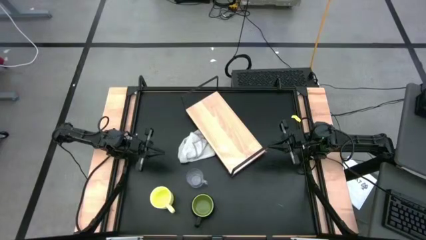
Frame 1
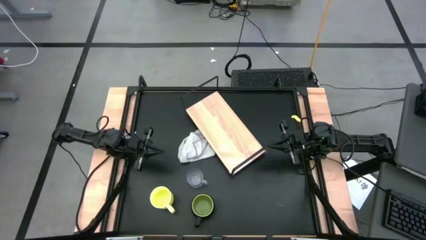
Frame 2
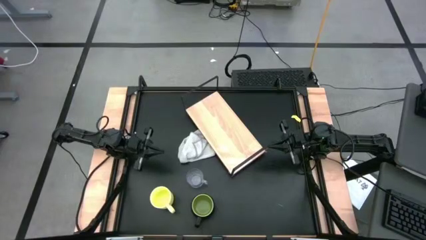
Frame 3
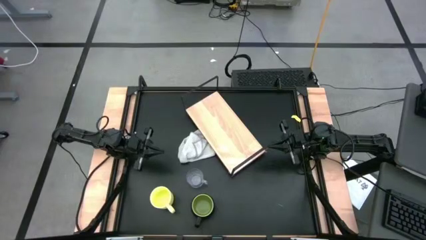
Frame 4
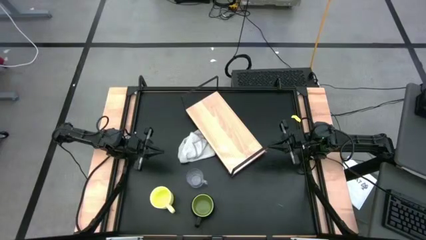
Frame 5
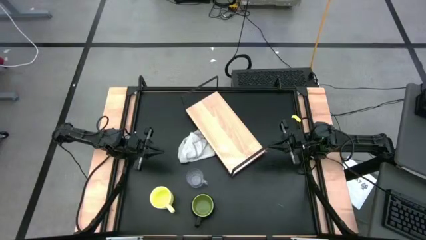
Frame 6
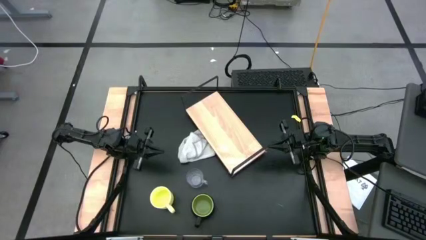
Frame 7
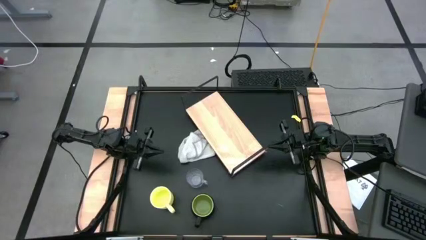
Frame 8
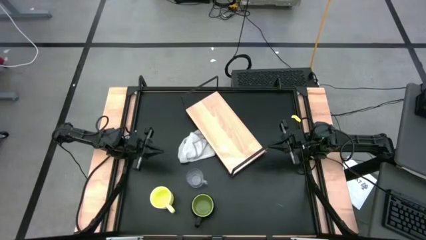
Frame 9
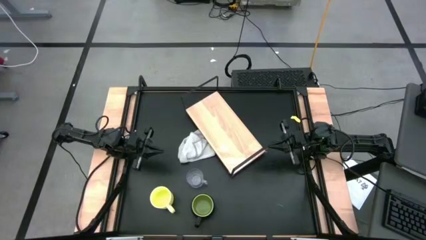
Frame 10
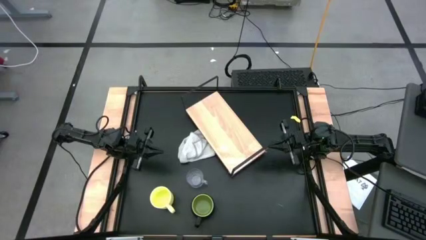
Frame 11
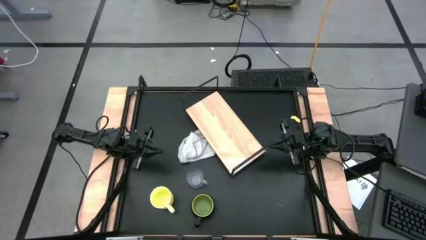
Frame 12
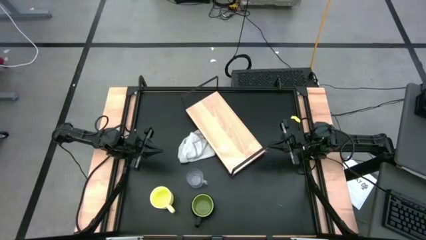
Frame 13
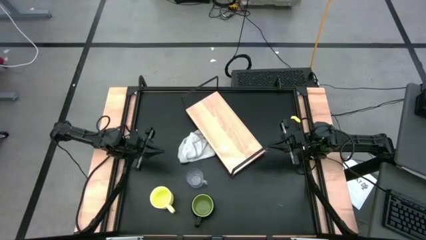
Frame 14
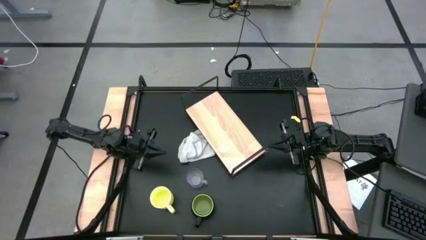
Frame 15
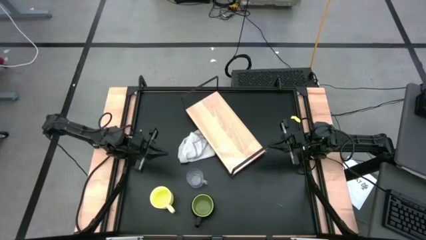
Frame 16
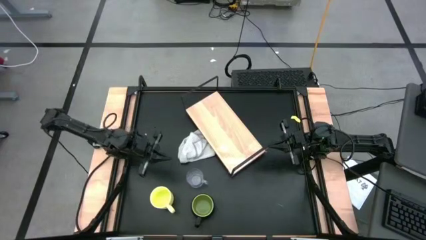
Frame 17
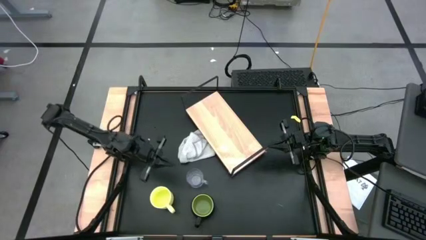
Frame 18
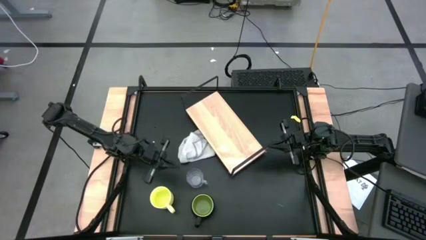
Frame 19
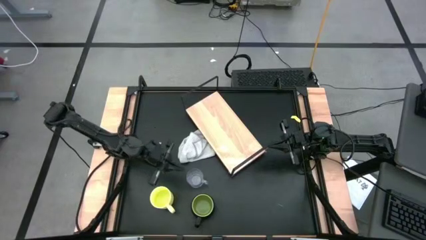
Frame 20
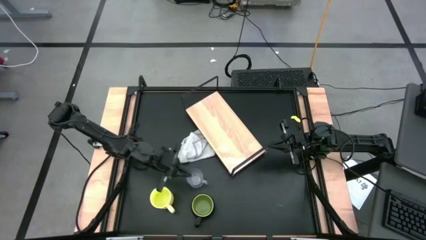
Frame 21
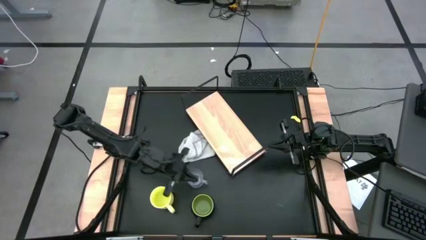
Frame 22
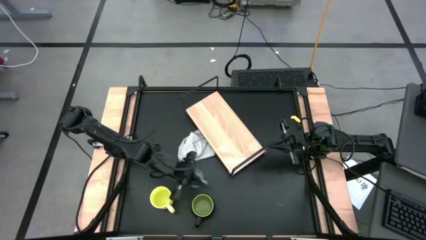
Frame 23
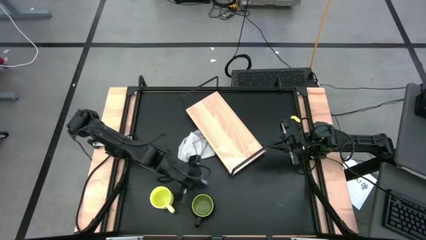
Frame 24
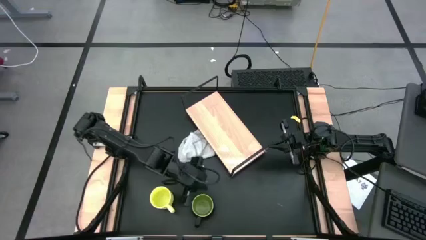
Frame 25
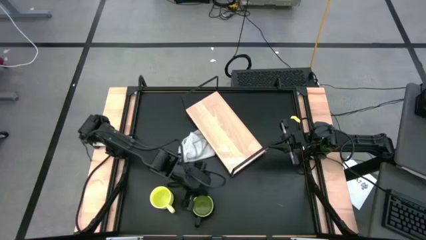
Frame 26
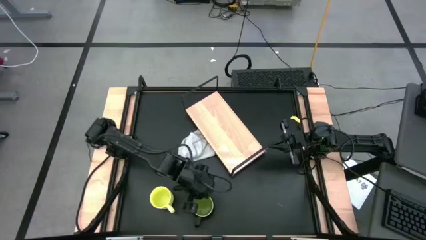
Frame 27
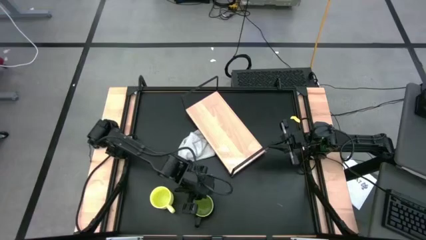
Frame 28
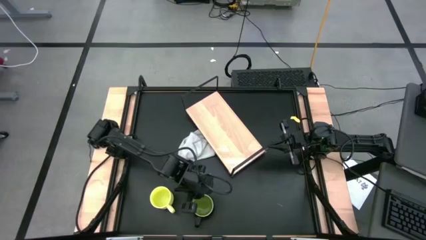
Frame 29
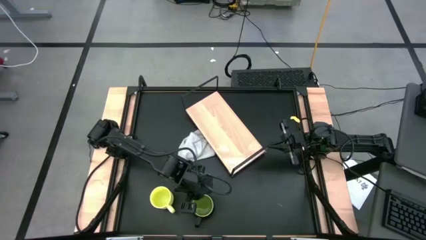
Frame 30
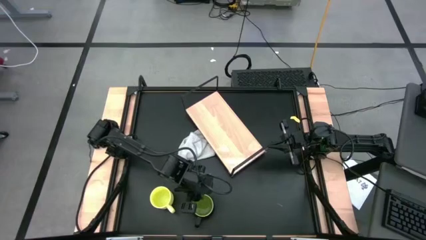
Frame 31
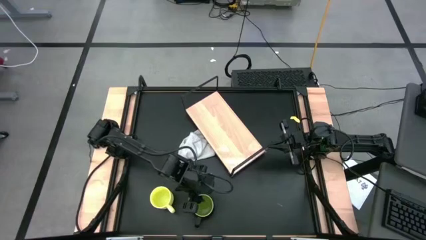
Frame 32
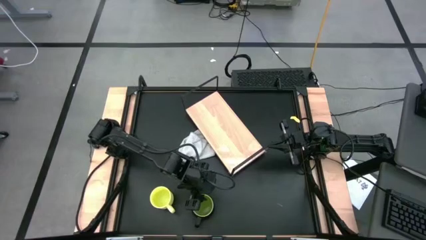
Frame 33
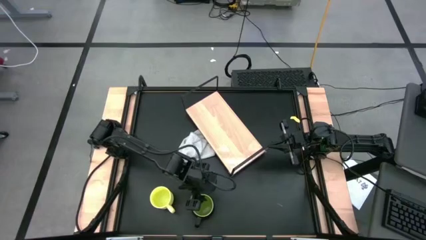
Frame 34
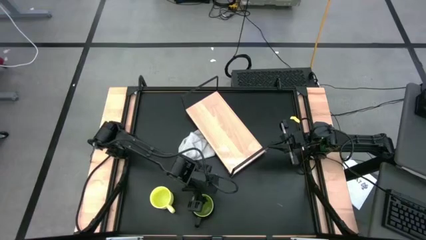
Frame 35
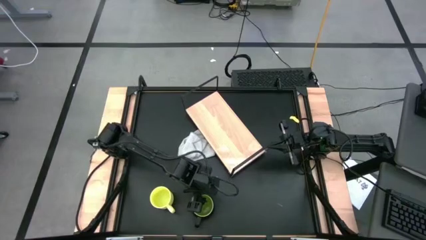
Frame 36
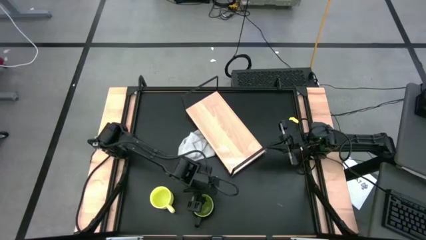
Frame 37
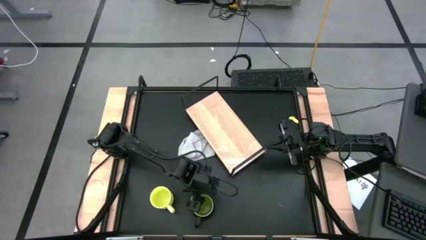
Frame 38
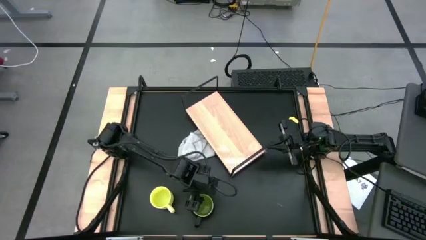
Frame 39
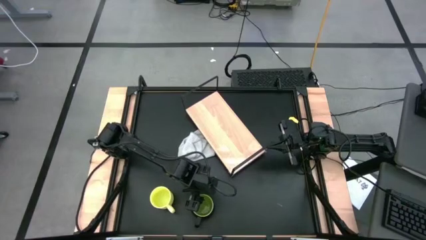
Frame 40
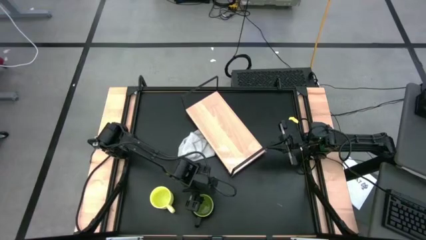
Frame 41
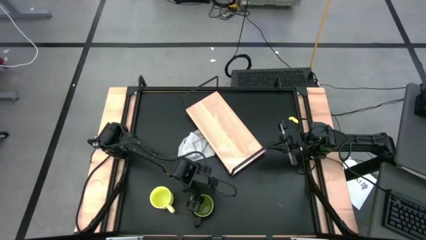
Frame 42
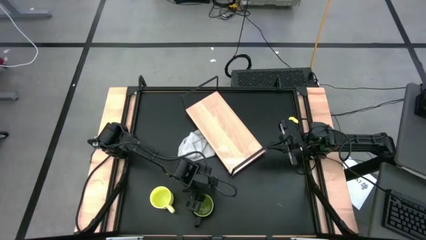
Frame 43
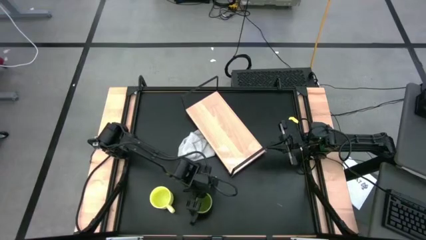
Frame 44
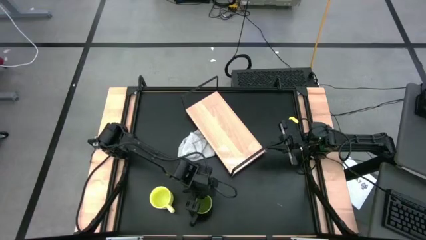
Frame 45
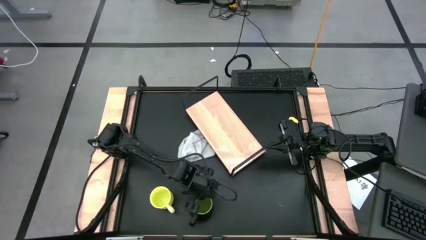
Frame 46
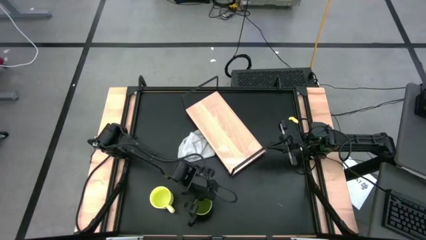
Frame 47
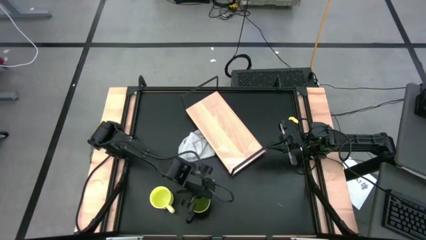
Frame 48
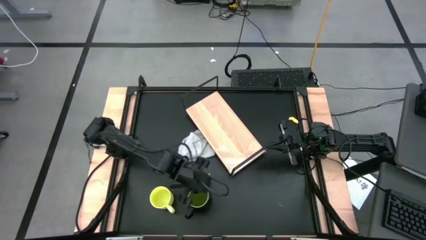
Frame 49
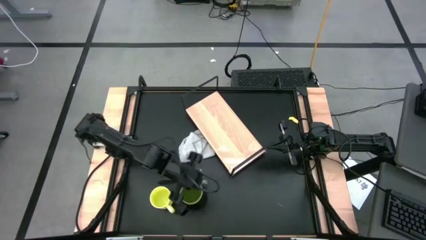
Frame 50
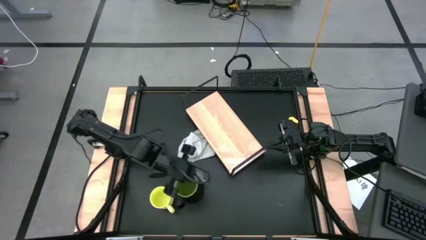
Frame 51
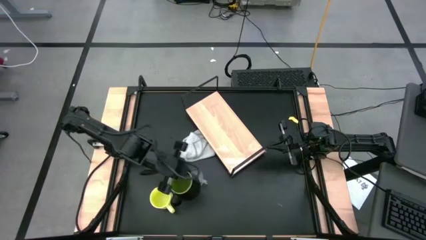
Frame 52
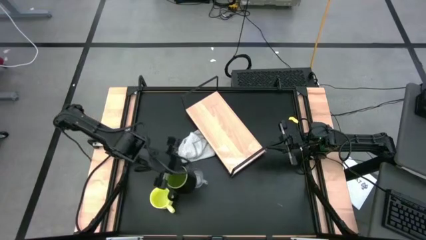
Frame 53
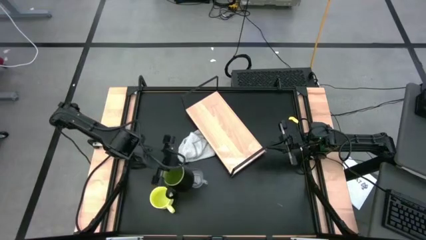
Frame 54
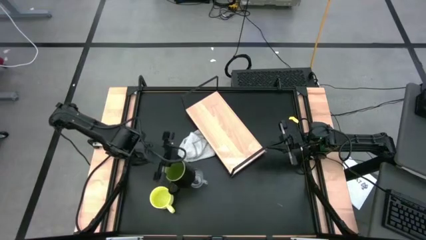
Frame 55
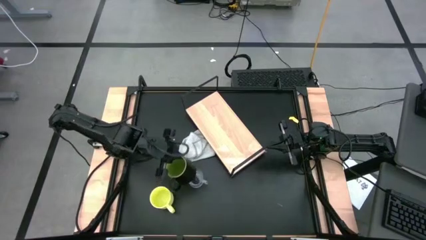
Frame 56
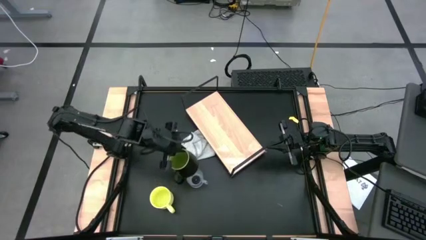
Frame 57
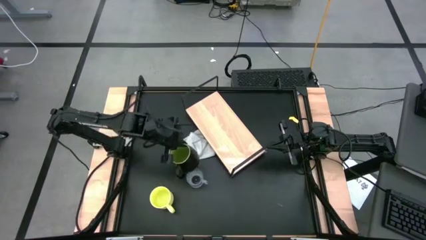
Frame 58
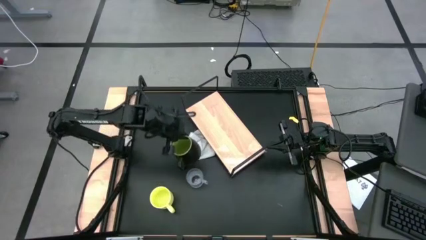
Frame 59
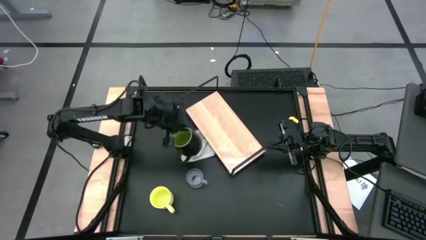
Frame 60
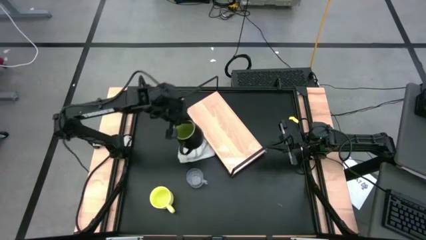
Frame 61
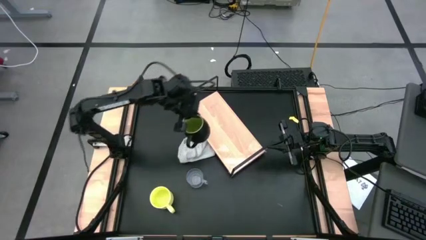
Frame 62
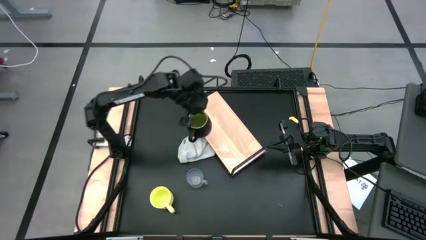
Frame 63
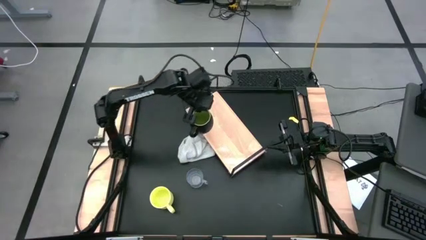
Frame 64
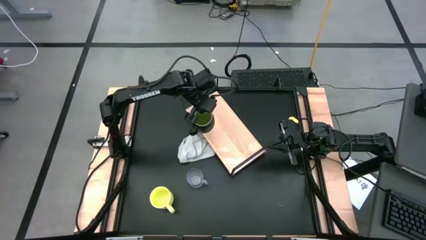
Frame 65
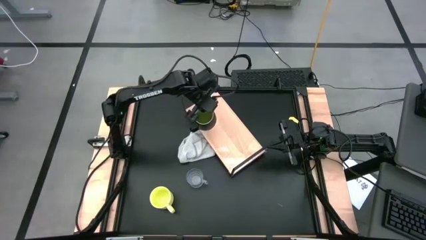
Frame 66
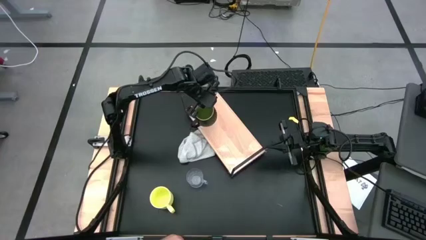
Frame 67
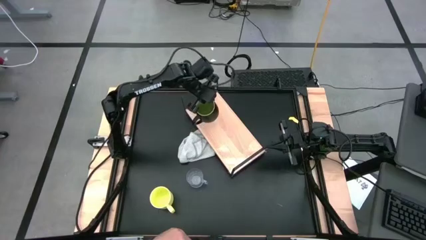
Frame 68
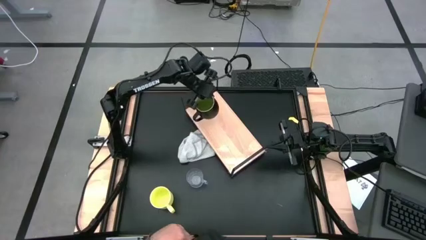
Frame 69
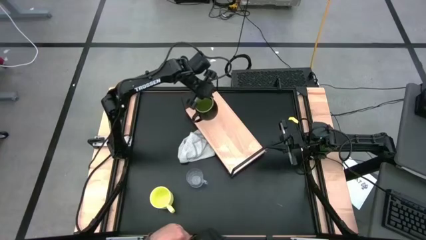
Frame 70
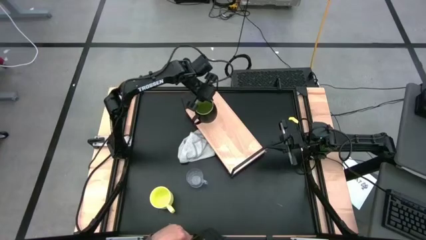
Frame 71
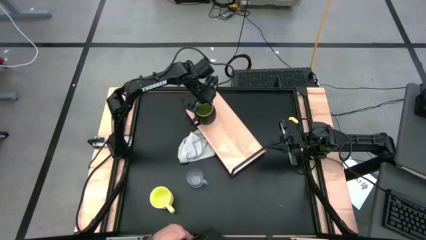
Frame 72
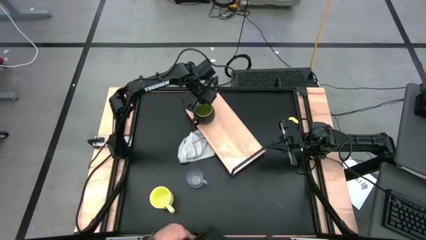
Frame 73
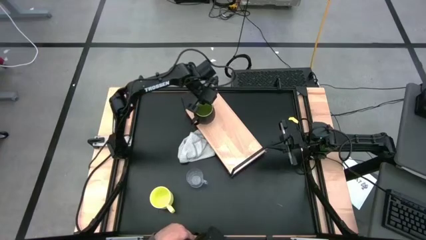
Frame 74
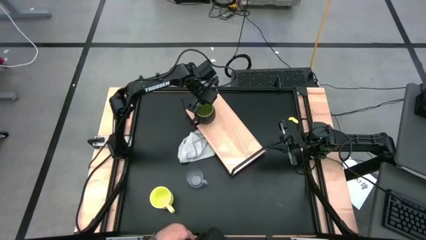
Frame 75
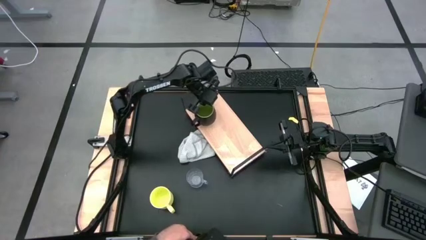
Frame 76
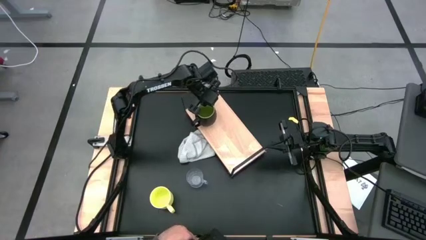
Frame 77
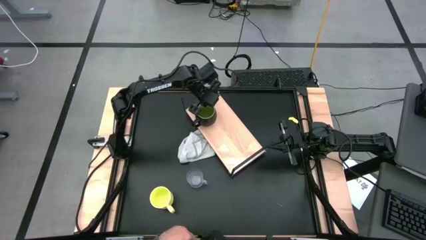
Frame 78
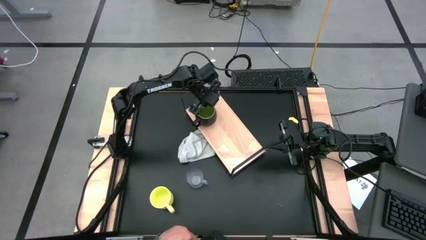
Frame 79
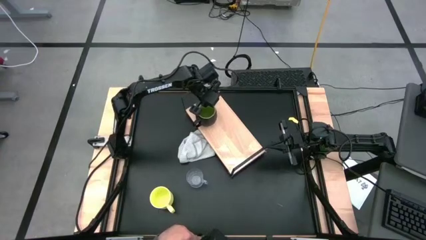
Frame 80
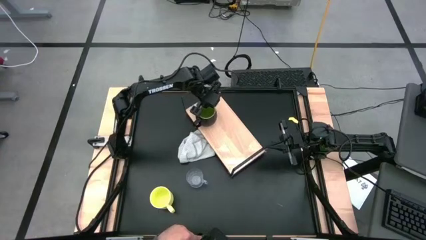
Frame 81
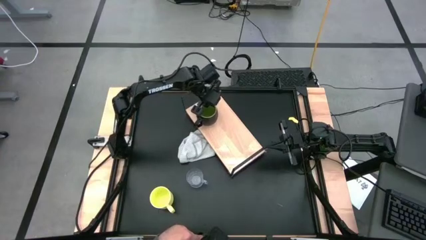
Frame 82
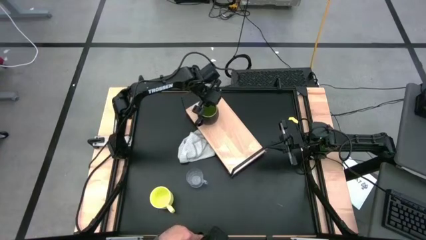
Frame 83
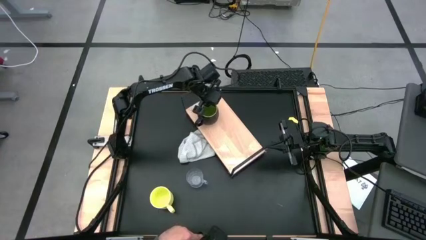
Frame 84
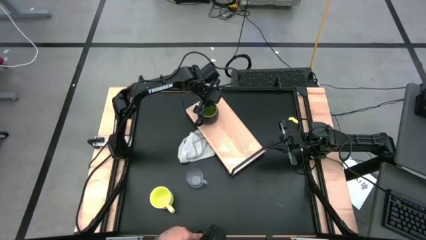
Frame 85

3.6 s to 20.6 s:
Task: Stack small to large cups/mugs on shelf
Put the black mug on the shelf
